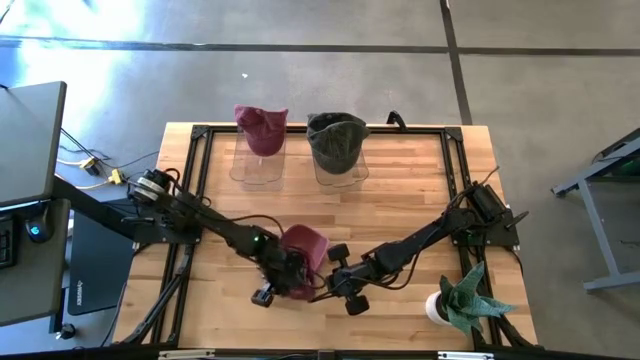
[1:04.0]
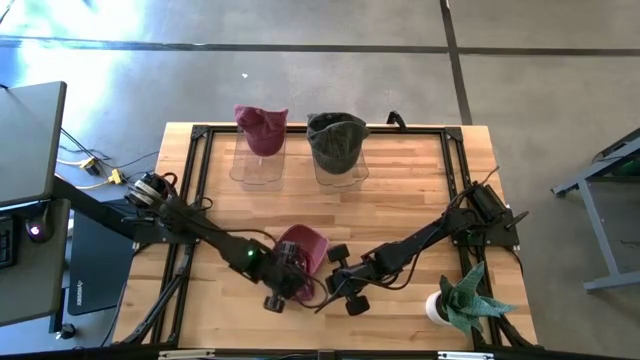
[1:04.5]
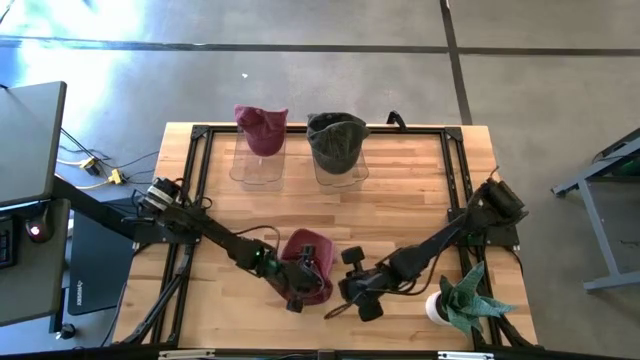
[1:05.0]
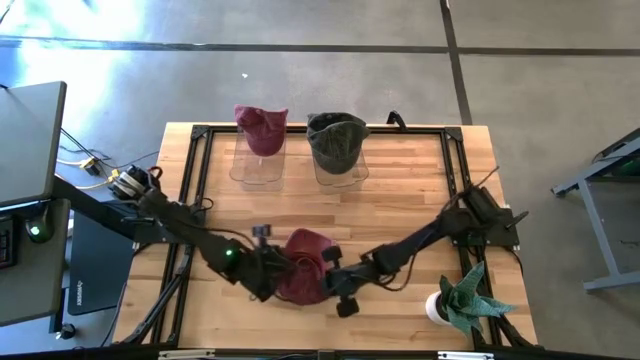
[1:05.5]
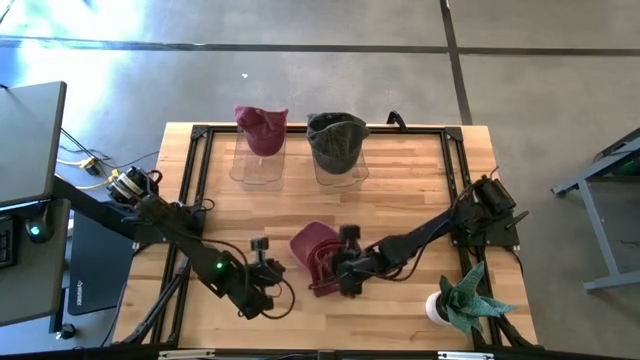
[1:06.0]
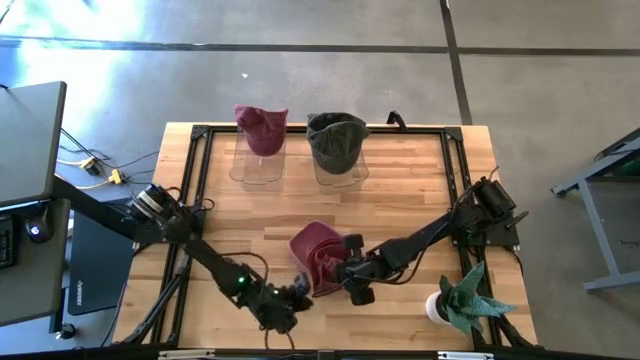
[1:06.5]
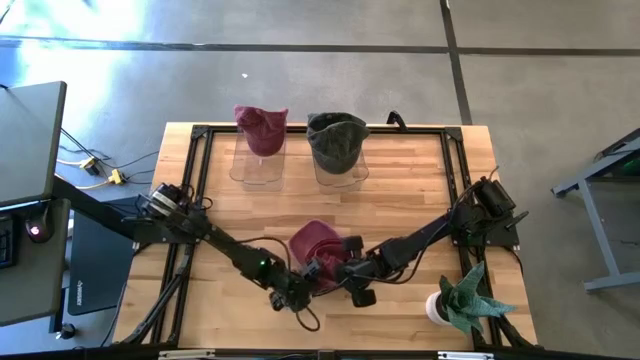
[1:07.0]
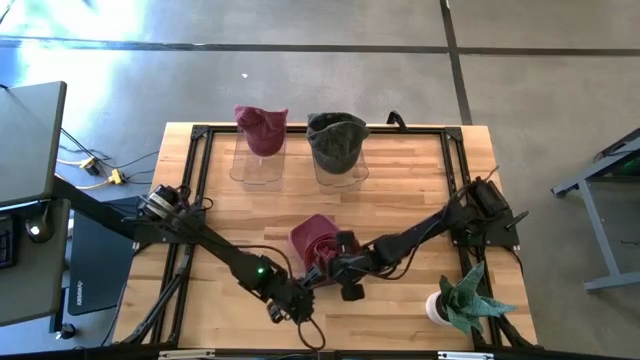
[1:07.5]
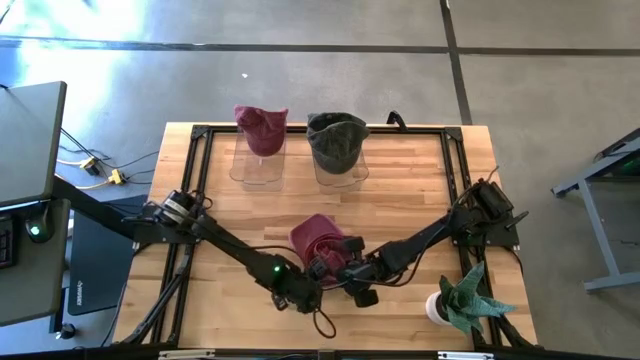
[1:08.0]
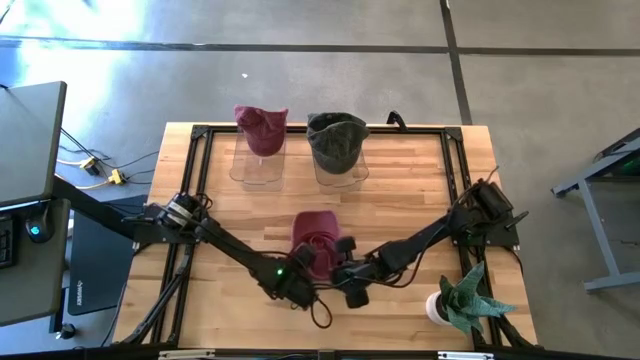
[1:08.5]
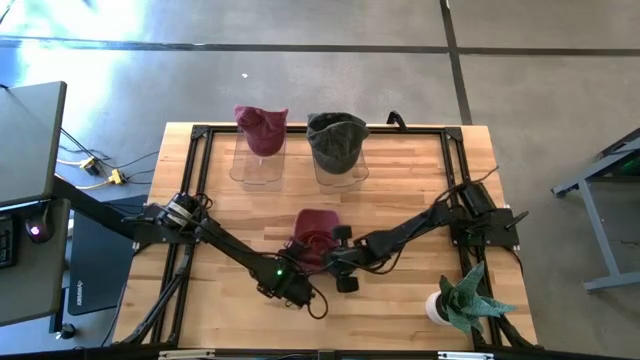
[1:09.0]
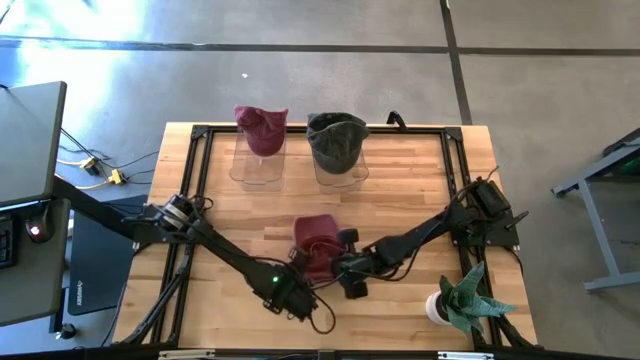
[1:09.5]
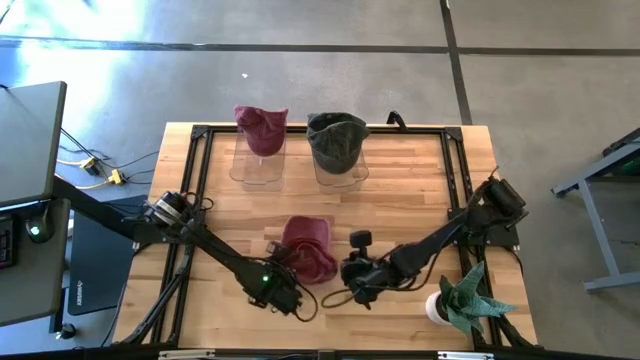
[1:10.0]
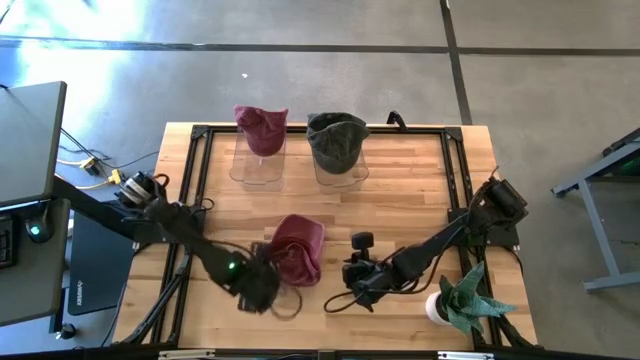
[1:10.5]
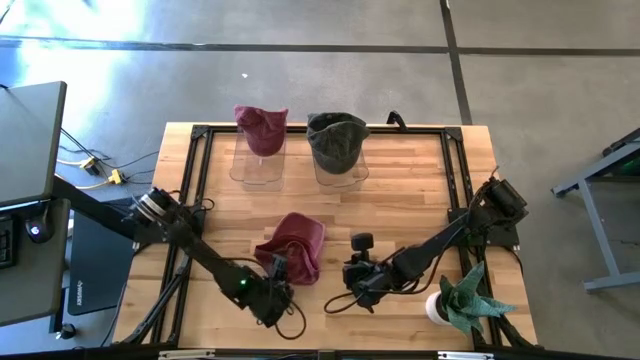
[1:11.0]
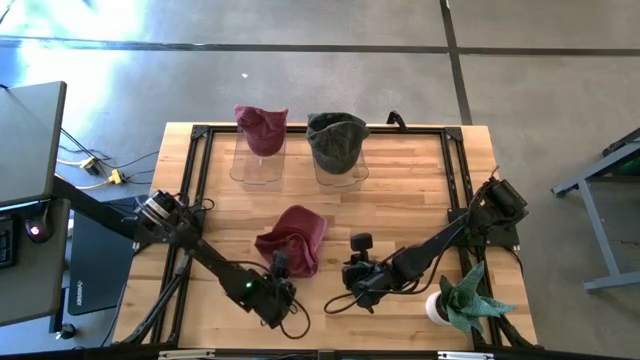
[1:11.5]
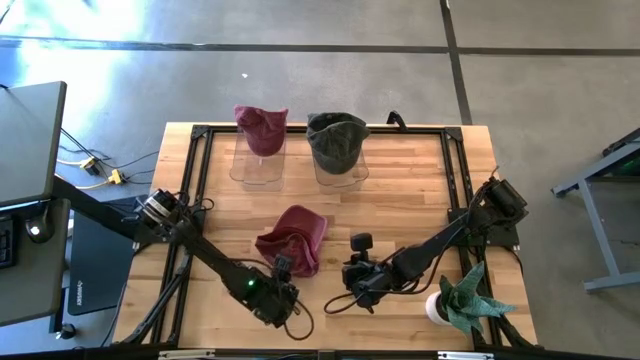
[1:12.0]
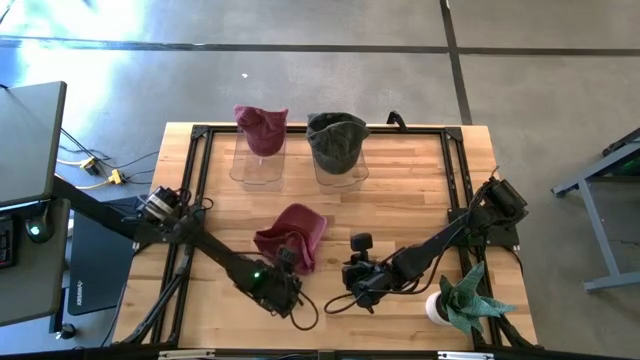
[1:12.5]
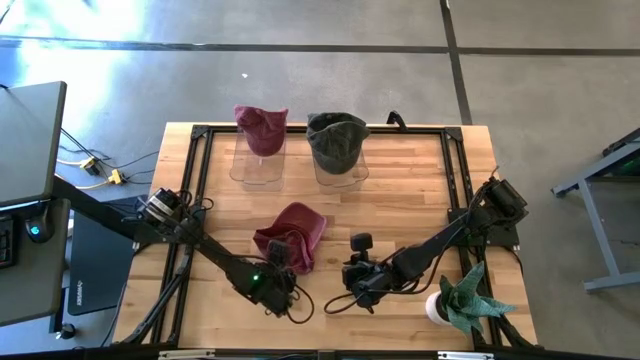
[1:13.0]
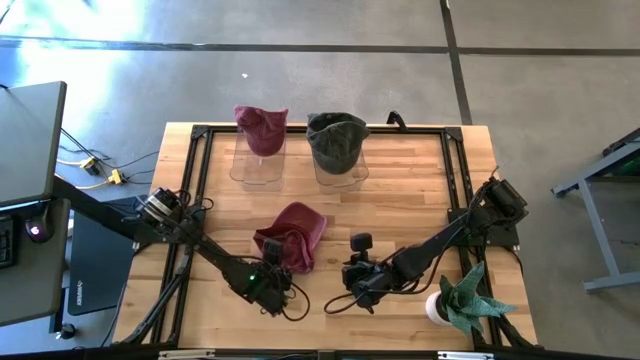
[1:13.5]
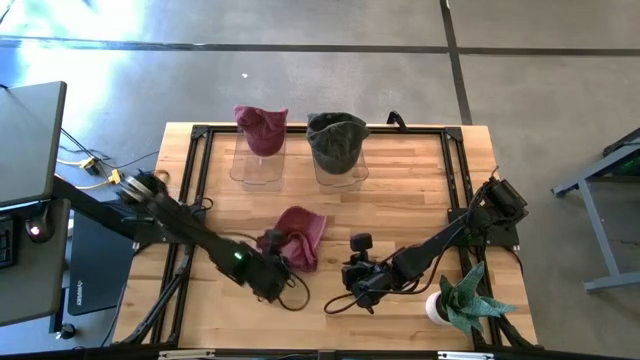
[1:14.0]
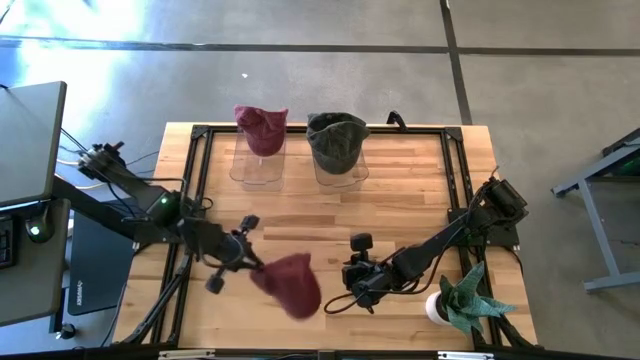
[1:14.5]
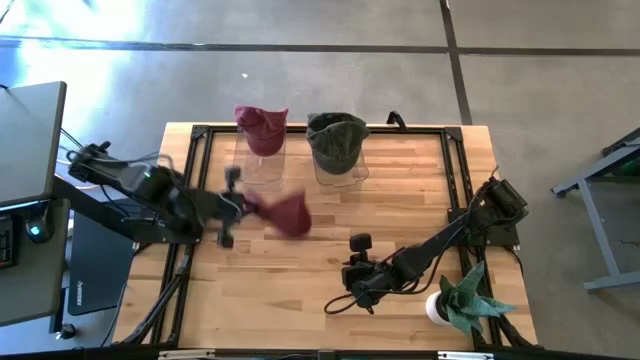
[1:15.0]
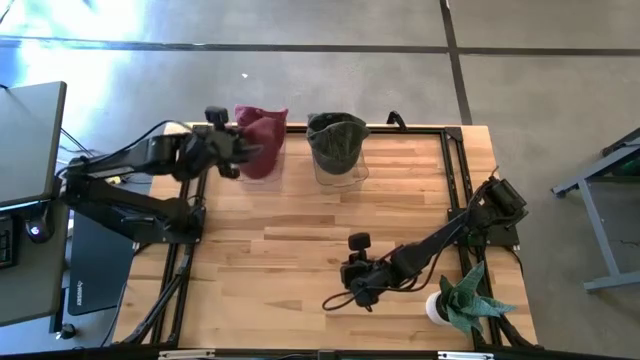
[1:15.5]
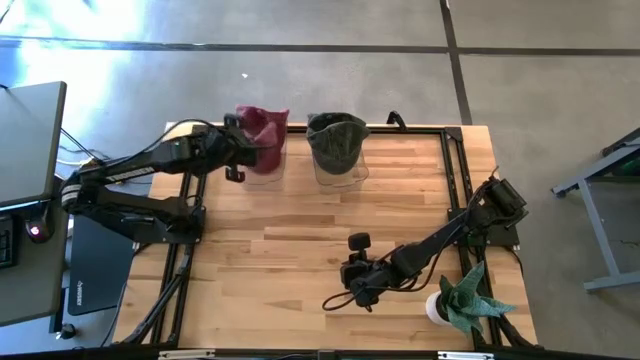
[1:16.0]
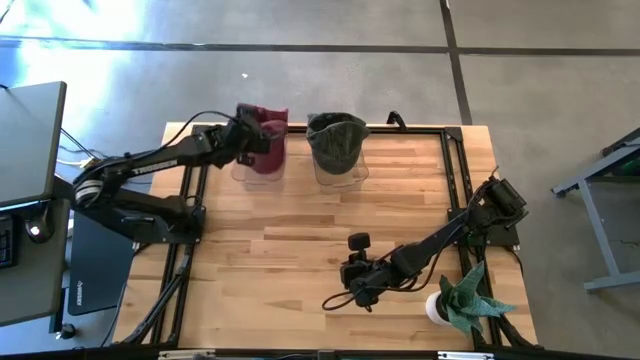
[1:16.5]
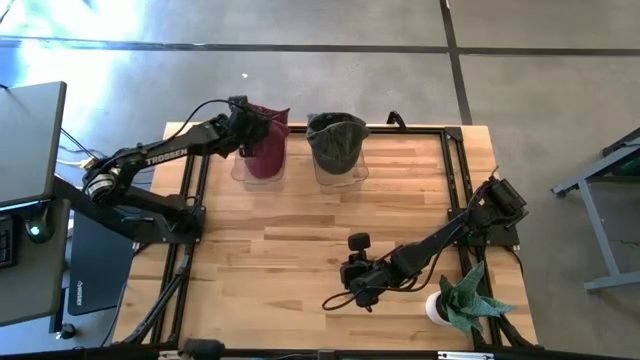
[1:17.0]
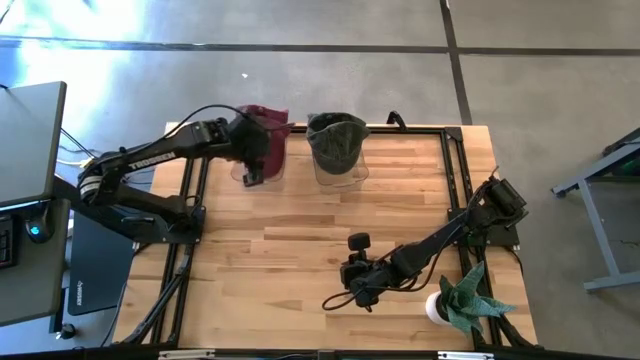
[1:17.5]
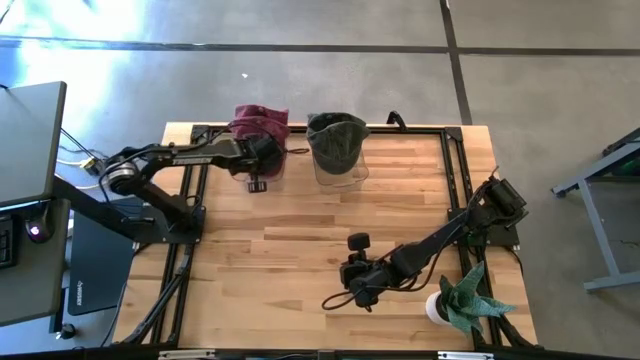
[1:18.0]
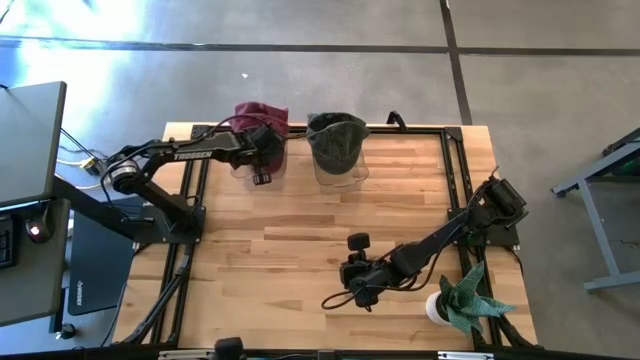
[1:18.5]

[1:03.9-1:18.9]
Task: Pick & Place hat
Put the red cap into the left transparent bin

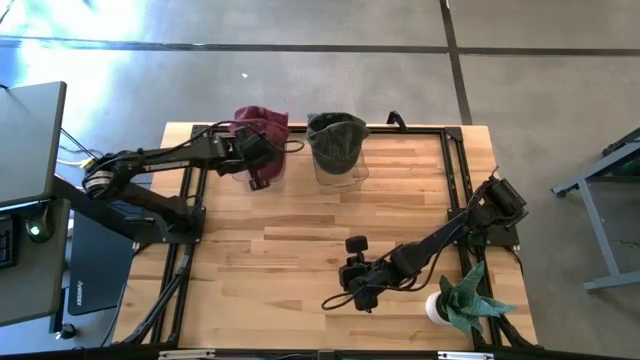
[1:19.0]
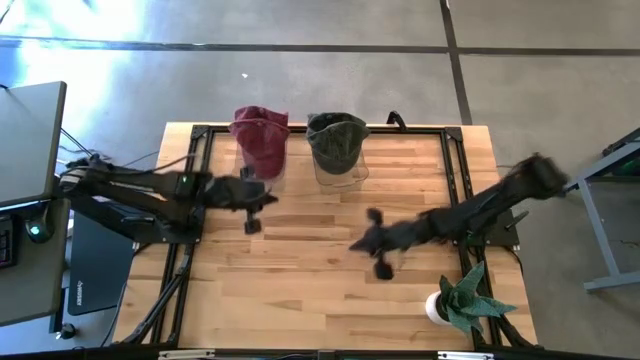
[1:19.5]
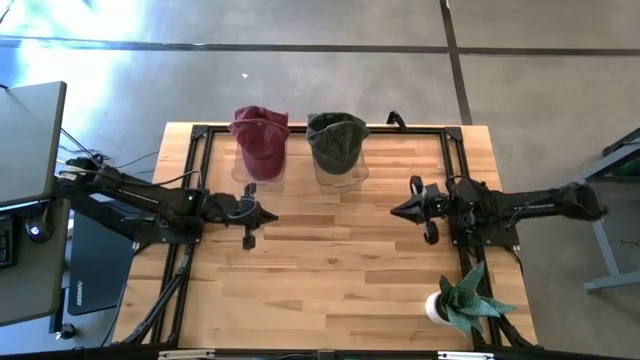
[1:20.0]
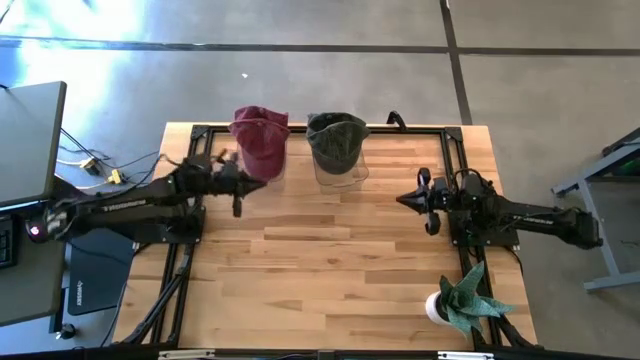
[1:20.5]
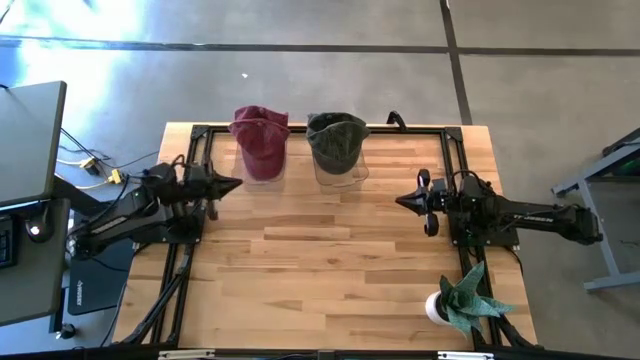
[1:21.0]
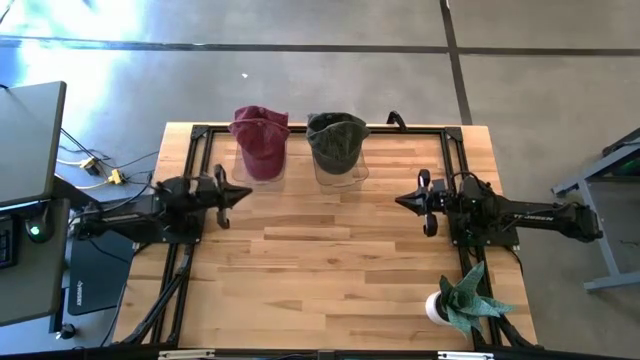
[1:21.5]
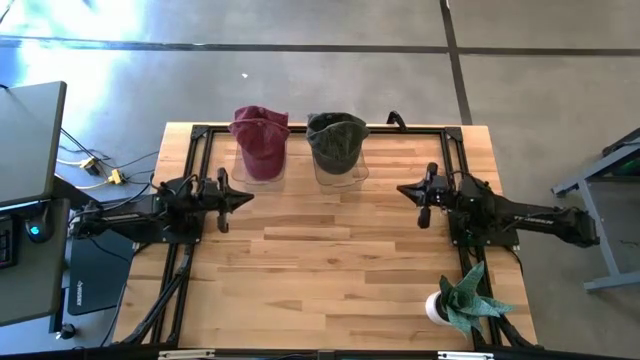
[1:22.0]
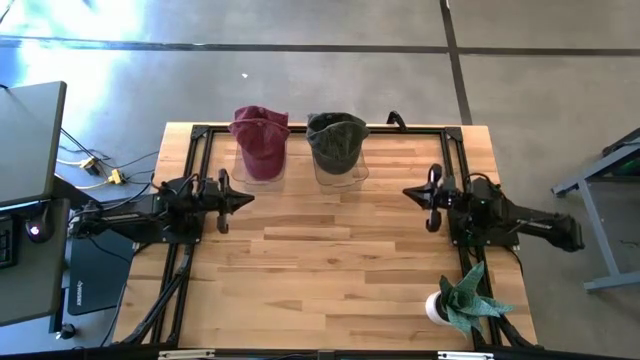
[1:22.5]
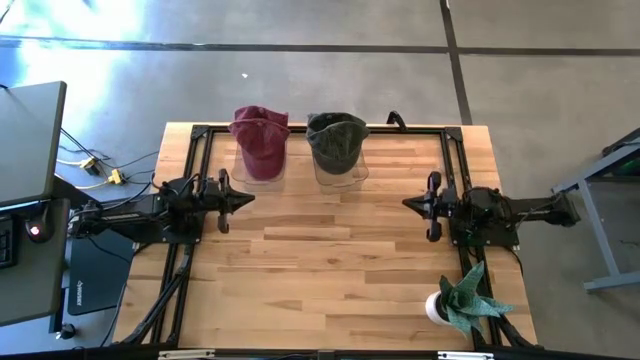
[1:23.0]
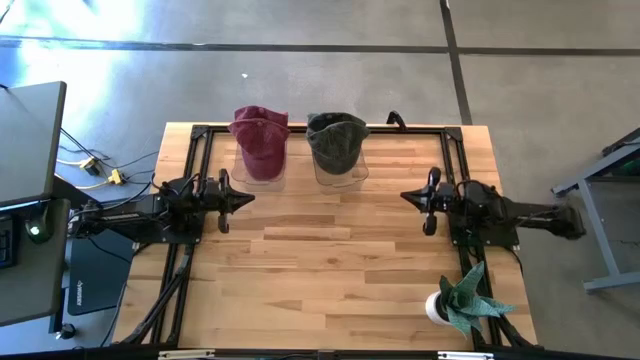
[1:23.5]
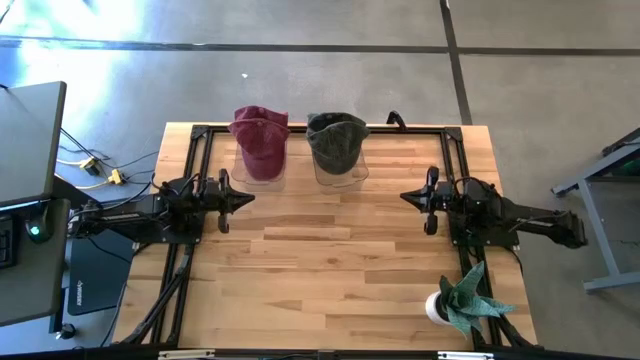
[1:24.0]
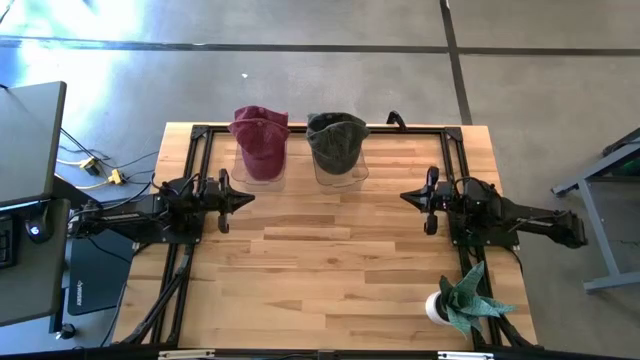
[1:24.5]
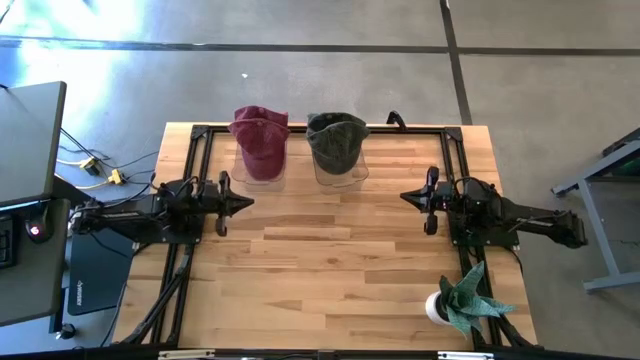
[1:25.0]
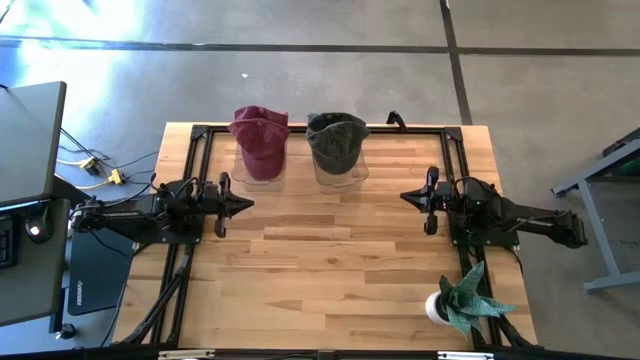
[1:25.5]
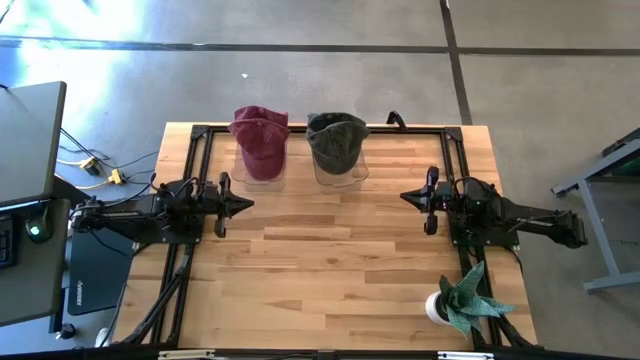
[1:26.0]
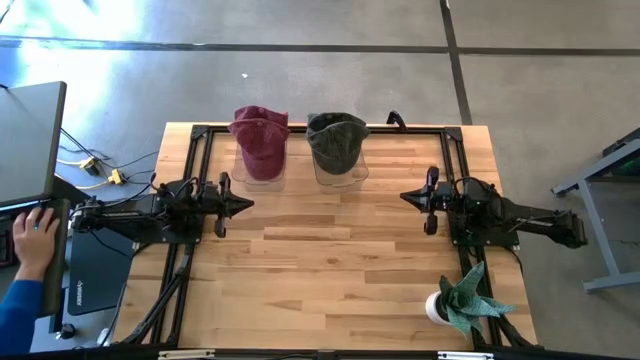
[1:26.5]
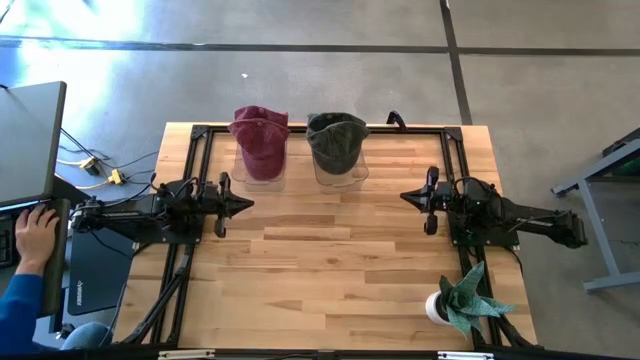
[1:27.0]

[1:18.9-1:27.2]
Return to Home Position
